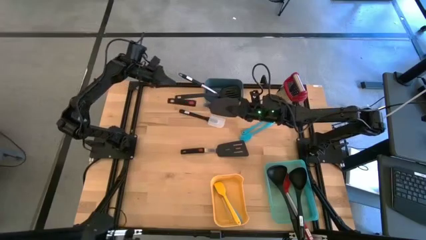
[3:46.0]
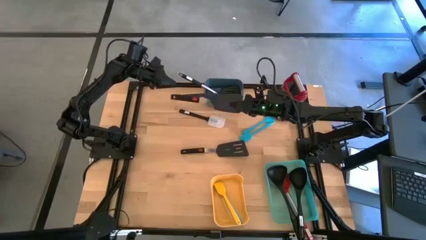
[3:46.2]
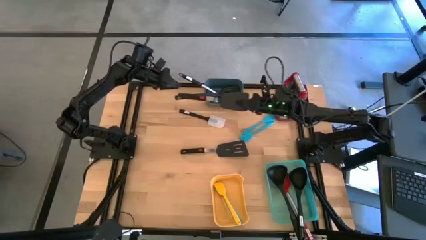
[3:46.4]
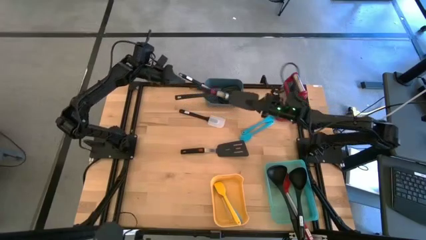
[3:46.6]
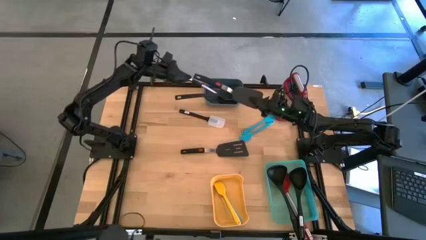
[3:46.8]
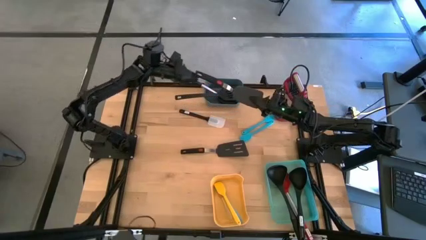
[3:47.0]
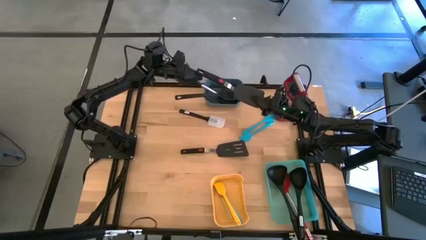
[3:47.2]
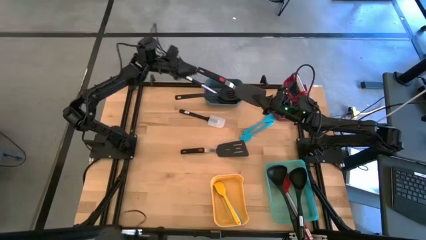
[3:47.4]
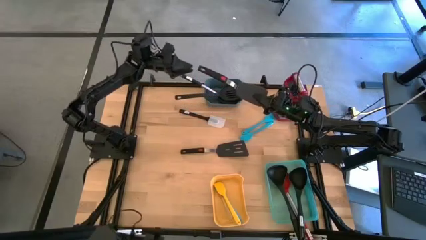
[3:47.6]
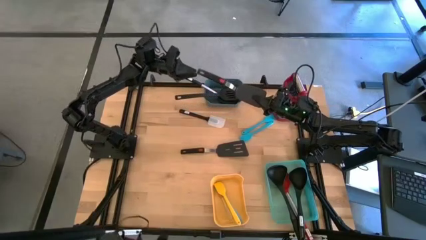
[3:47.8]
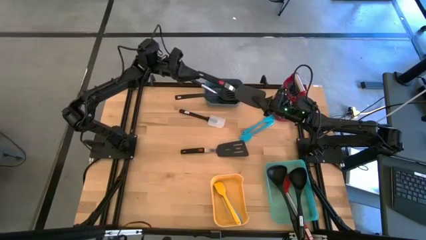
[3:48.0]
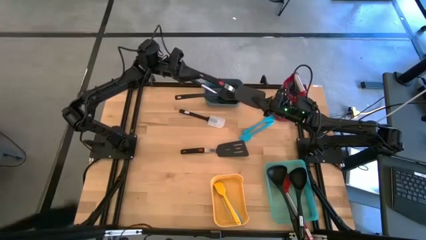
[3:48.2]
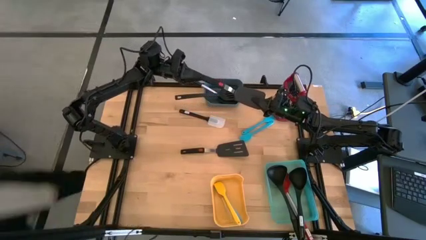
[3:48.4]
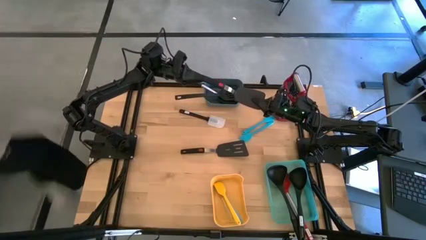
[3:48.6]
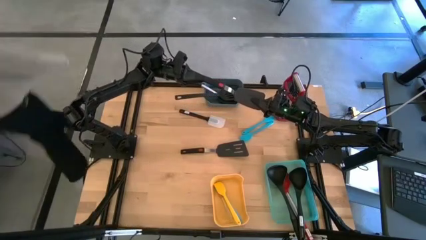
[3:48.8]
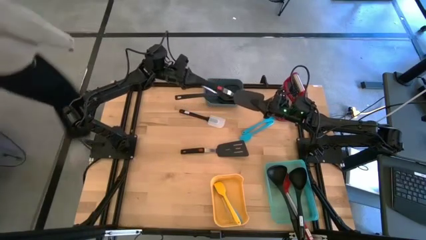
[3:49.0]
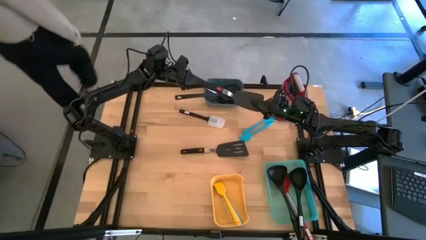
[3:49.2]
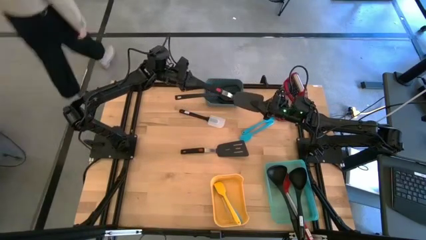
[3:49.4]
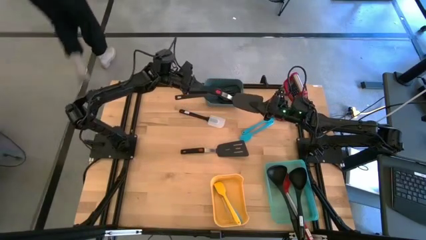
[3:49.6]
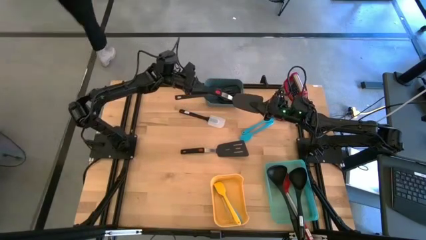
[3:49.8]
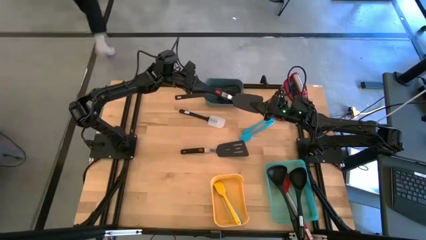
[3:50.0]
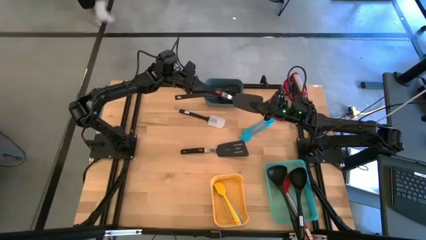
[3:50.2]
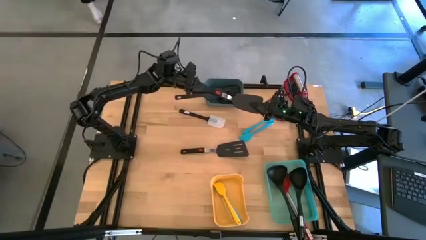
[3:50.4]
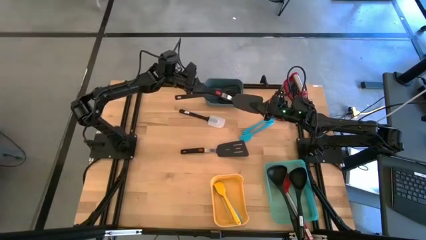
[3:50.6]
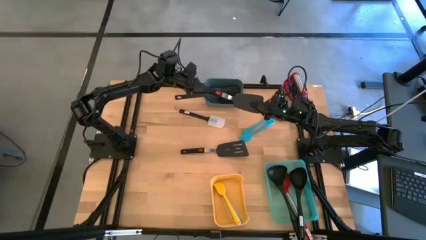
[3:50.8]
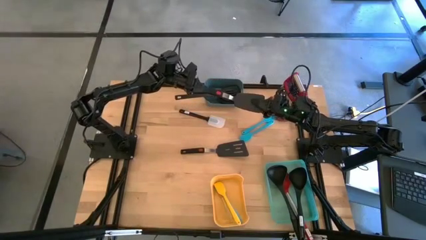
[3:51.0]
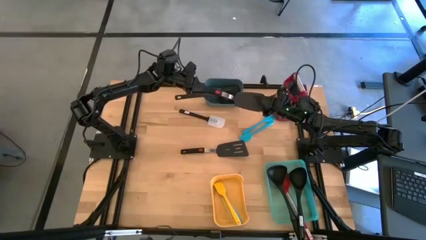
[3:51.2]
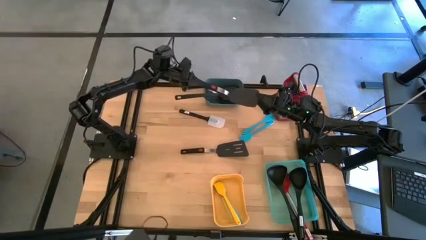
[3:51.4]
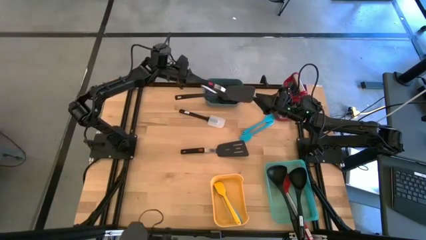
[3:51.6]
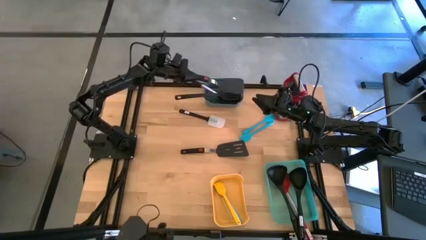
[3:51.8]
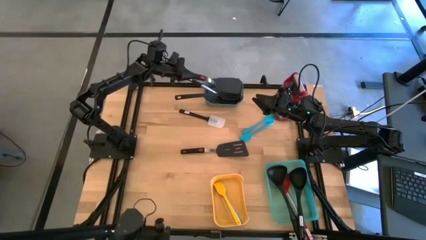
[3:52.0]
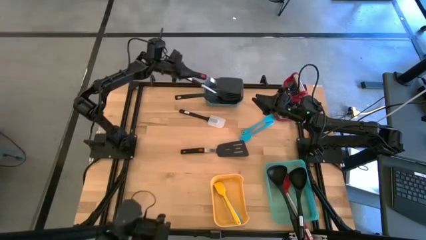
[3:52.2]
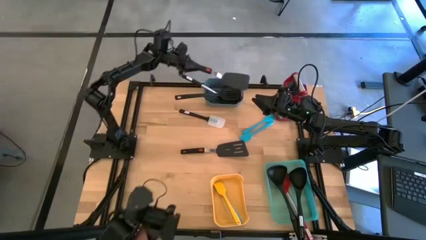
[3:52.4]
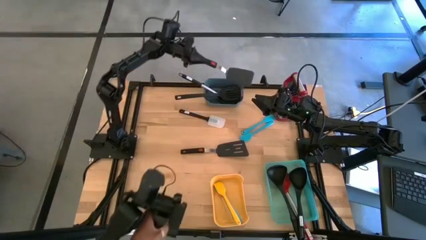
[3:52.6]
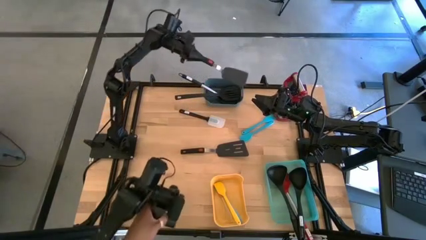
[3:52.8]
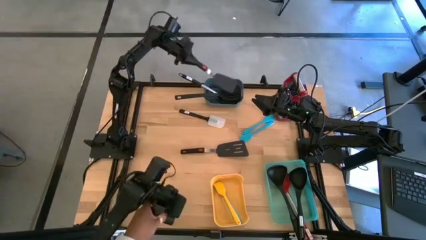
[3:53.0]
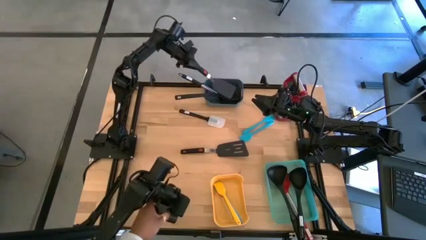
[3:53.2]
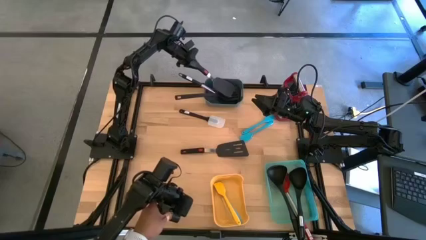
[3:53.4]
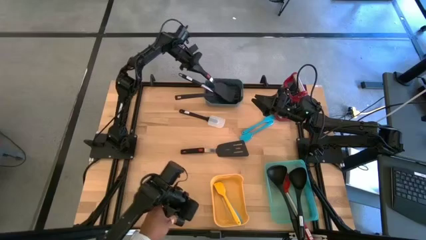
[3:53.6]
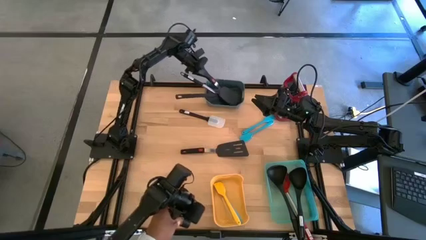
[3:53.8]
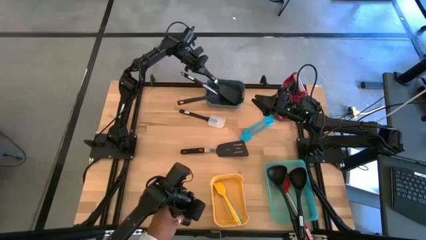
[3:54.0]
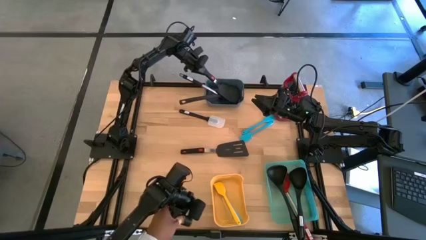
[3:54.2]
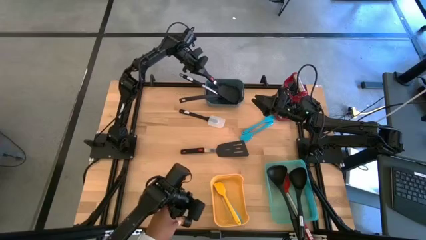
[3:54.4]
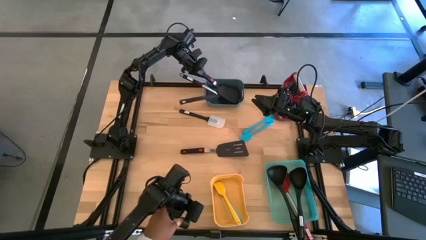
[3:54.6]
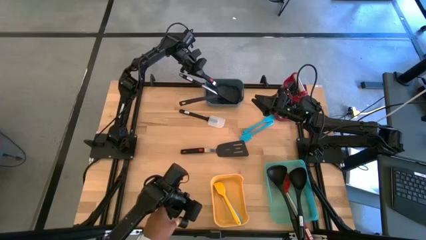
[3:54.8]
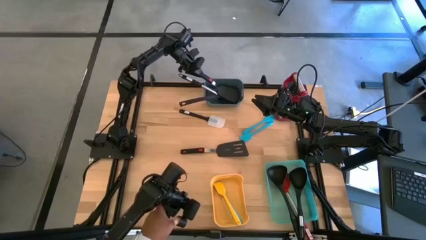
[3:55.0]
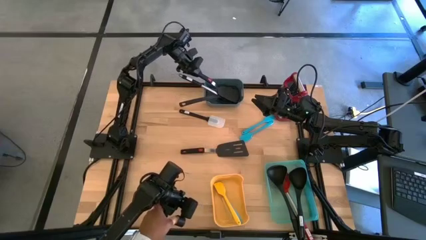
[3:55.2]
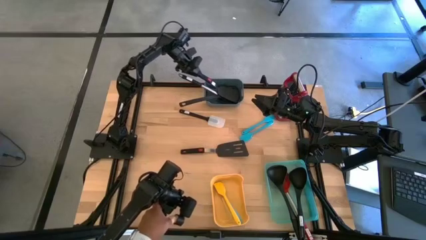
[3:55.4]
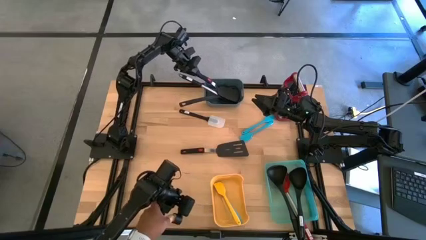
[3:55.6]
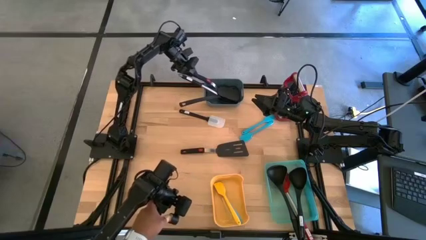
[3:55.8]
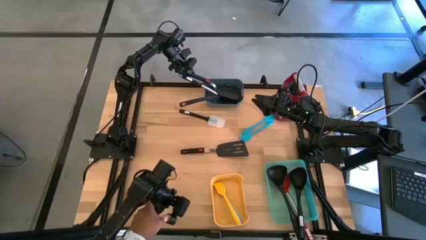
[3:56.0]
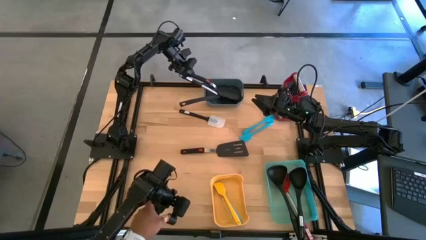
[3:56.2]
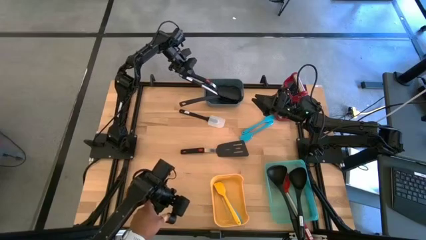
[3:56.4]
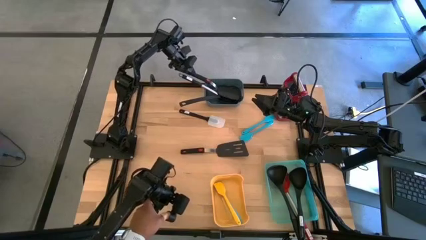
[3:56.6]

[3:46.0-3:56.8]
Task: Pick & Place Kitchen Items
Put the large black spatula into the blue bin

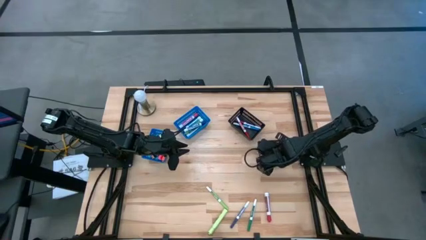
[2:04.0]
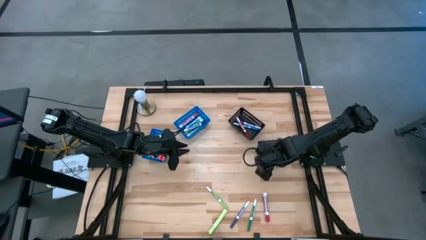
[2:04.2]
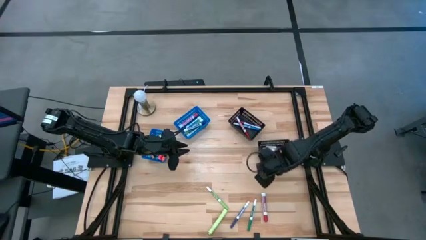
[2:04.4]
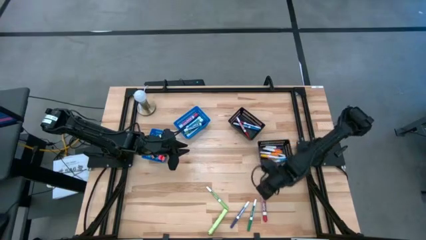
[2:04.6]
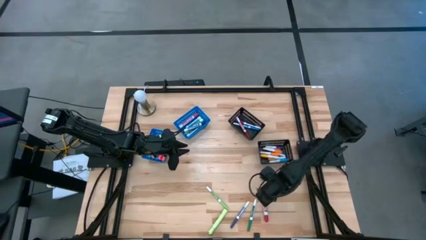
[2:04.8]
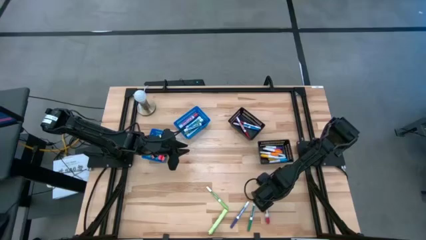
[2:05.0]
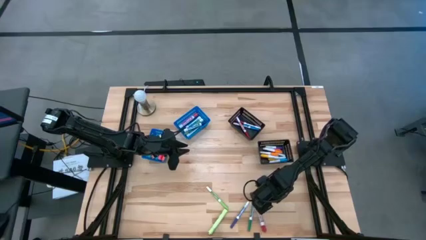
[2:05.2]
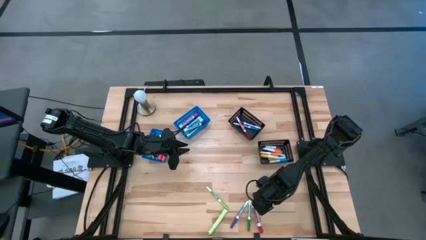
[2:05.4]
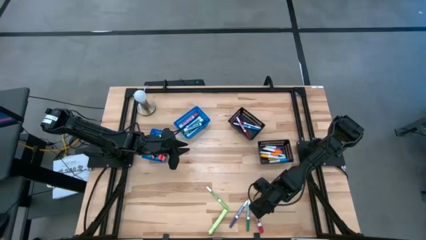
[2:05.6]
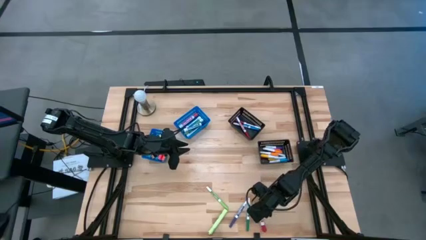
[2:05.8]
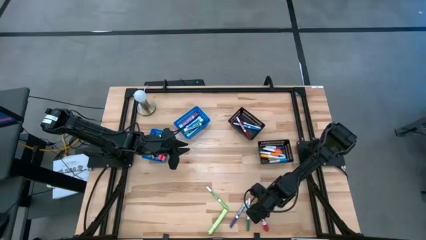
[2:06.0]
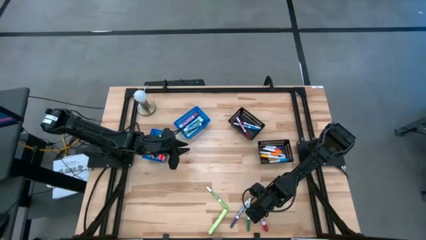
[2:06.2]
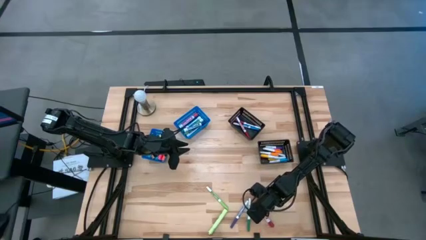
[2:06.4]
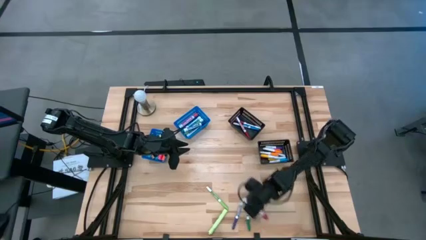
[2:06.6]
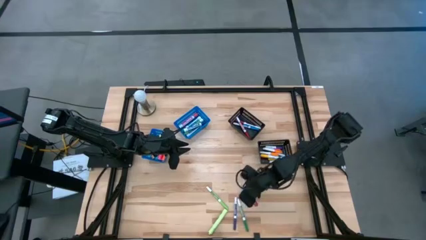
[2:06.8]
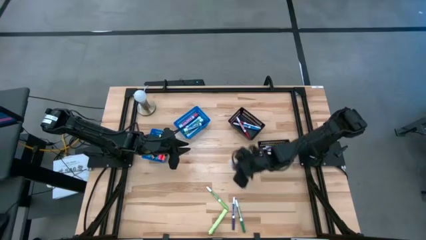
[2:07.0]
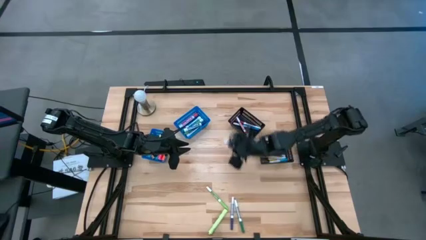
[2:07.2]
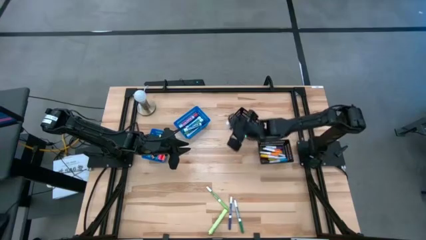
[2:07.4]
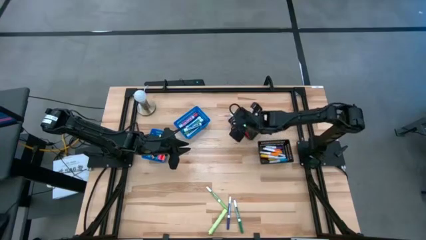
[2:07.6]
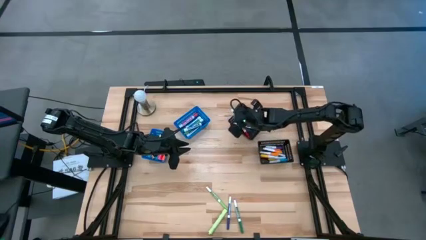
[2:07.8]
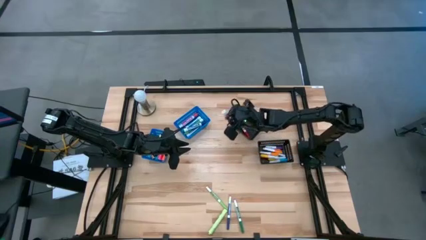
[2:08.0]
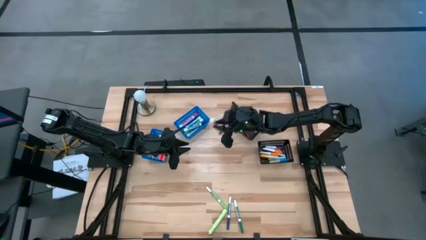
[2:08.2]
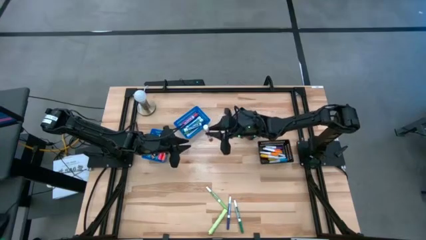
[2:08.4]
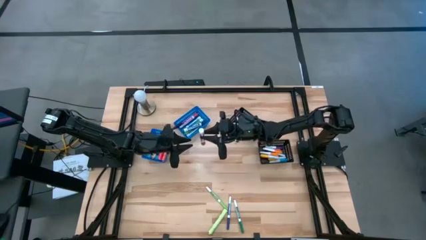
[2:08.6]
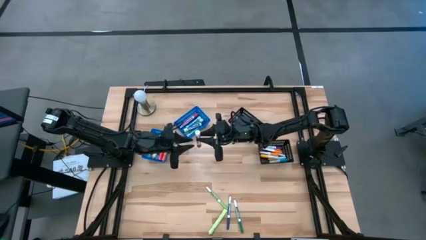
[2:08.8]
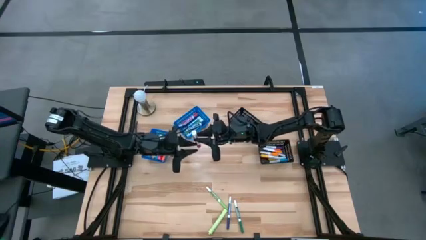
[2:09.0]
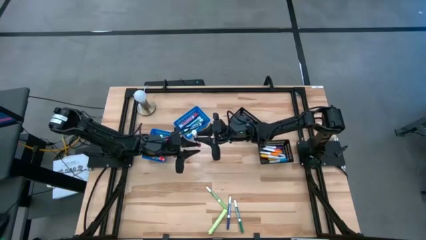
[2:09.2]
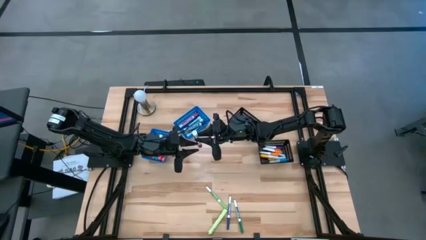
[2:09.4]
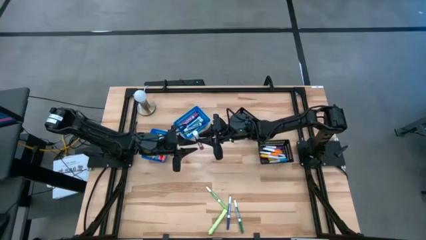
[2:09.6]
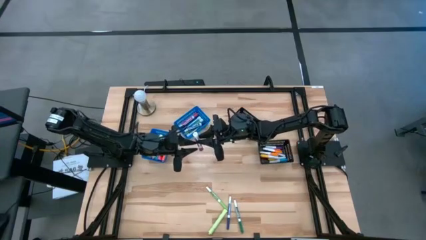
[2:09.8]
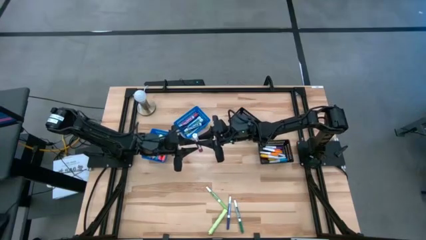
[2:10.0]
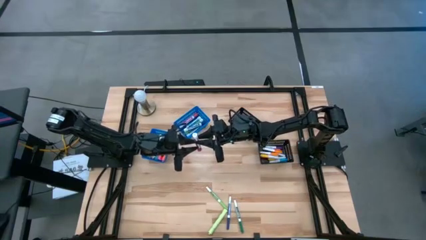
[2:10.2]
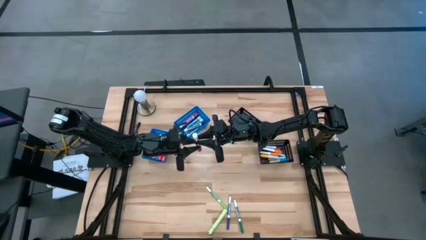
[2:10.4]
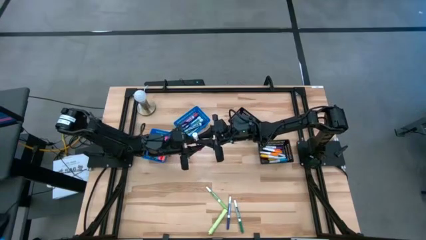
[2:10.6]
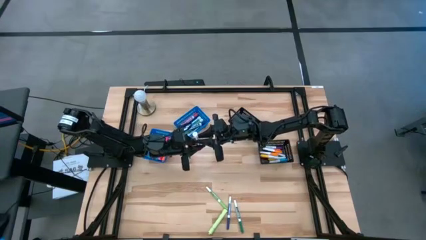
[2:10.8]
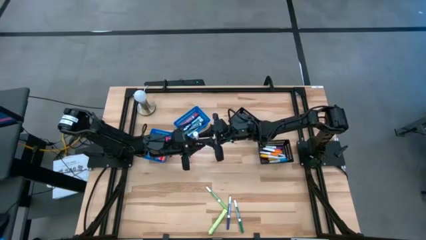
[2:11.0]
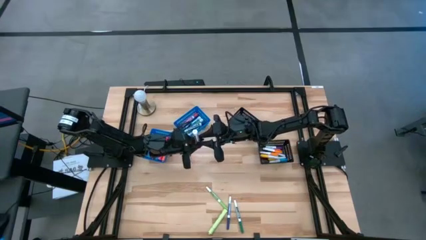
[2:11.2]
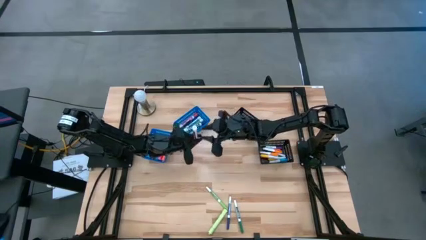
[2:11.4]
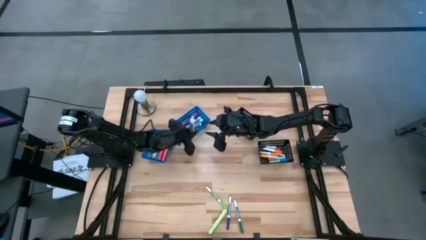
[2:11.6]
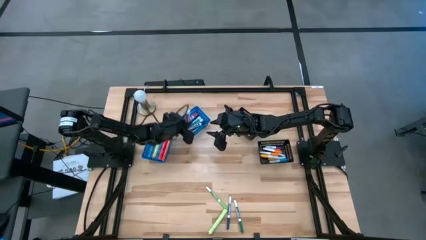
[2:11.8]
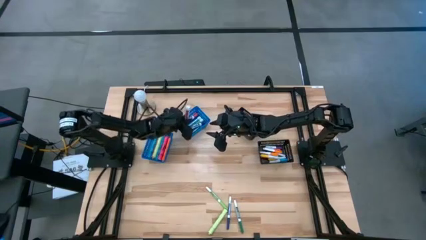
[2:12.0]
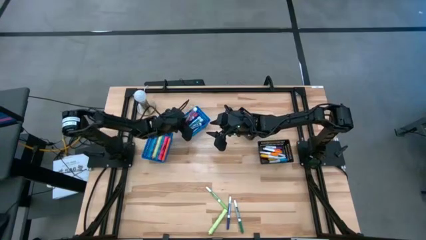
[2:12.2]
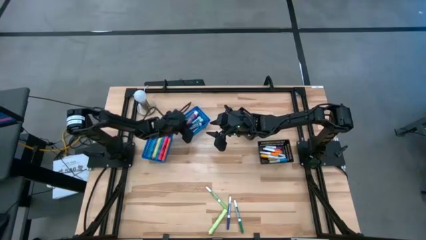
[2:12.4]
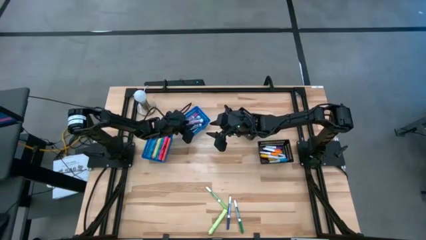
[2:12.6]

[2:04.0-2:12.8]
Task: Pick & Place Markers
Put the red marker pen into the right blue bin
